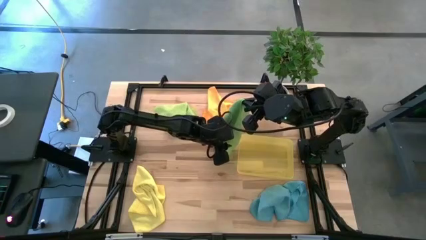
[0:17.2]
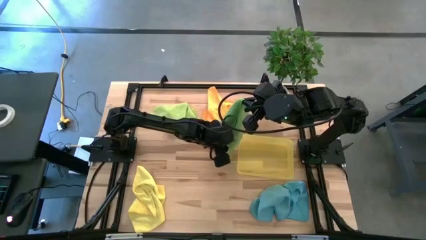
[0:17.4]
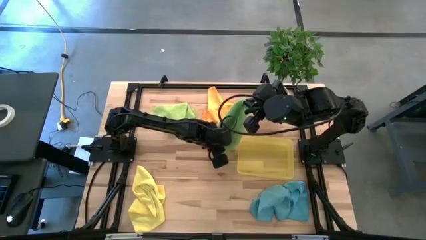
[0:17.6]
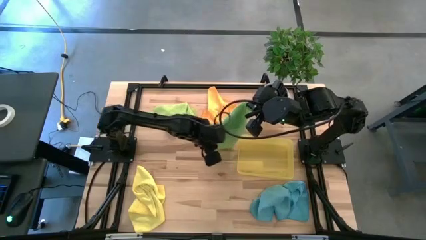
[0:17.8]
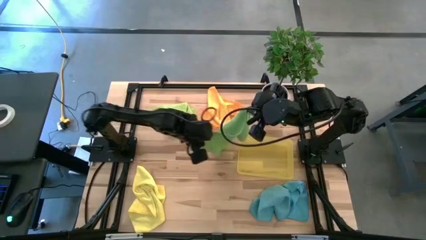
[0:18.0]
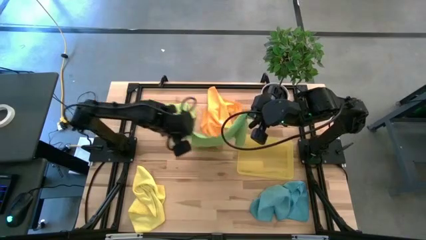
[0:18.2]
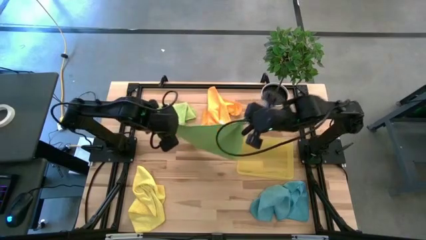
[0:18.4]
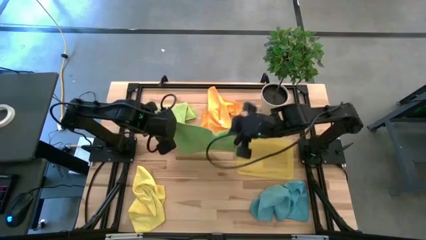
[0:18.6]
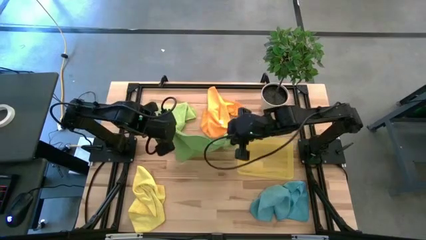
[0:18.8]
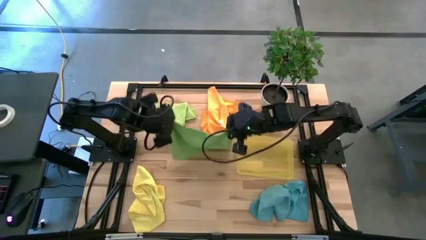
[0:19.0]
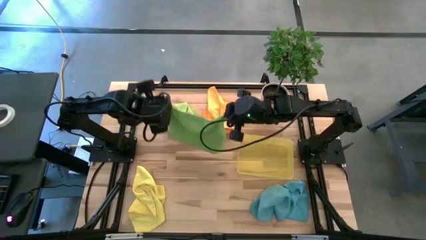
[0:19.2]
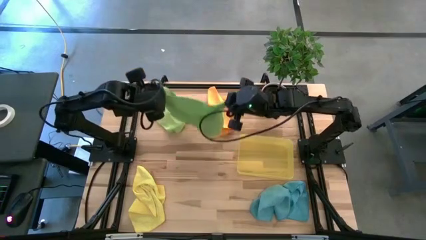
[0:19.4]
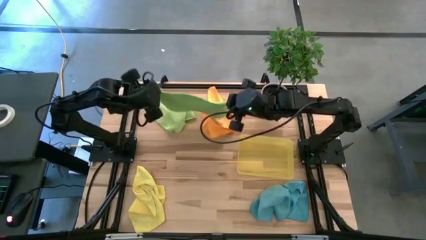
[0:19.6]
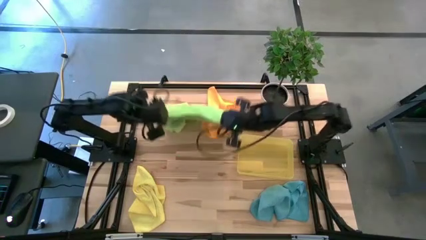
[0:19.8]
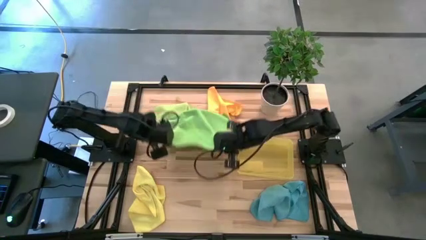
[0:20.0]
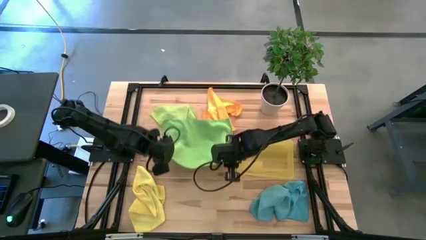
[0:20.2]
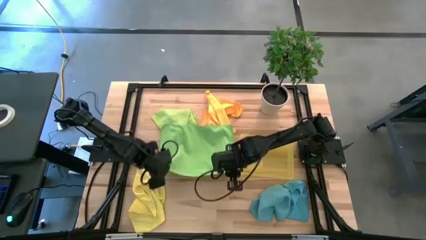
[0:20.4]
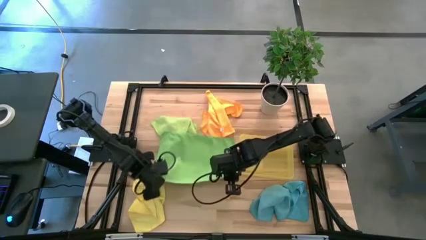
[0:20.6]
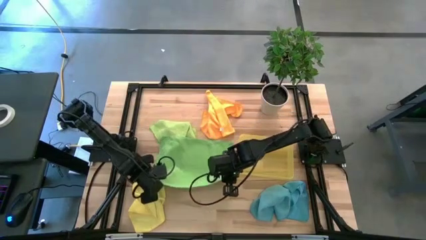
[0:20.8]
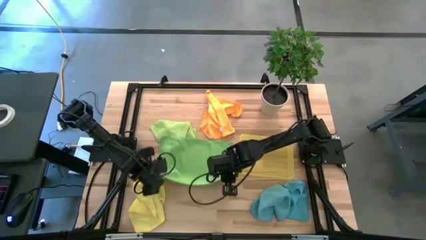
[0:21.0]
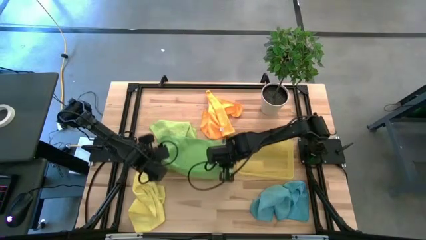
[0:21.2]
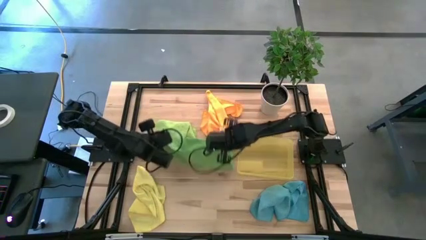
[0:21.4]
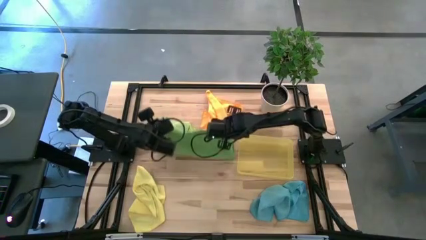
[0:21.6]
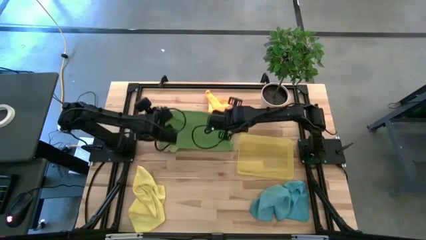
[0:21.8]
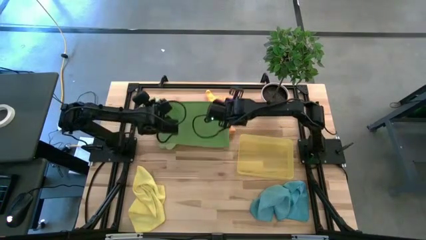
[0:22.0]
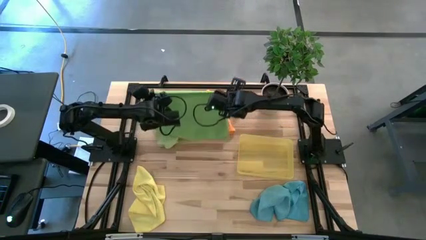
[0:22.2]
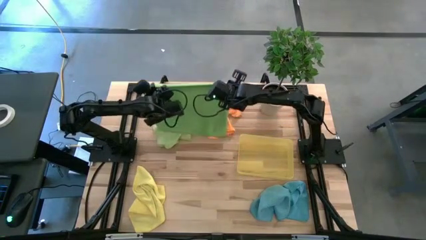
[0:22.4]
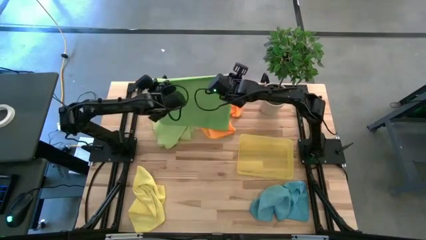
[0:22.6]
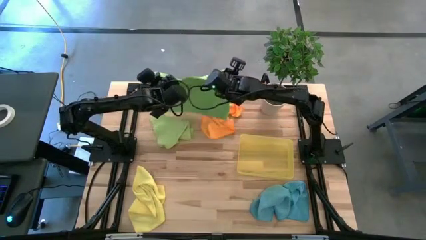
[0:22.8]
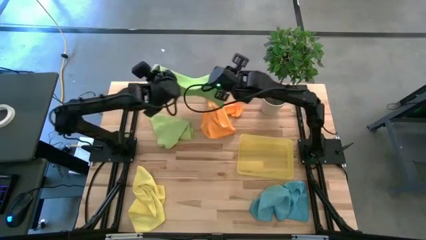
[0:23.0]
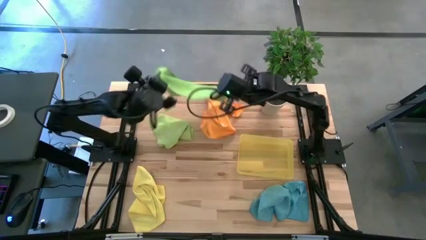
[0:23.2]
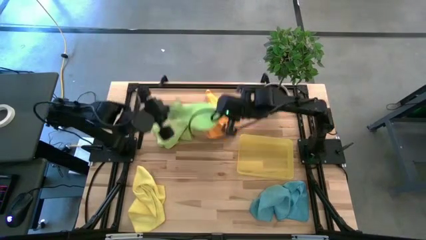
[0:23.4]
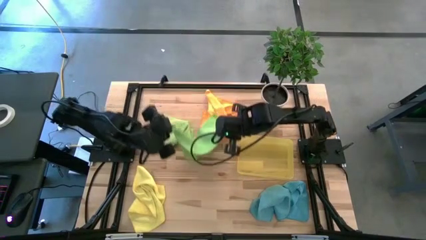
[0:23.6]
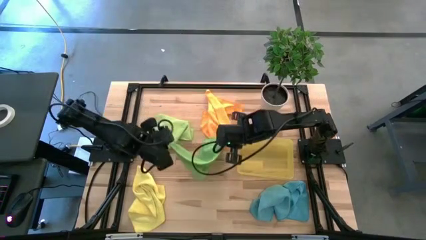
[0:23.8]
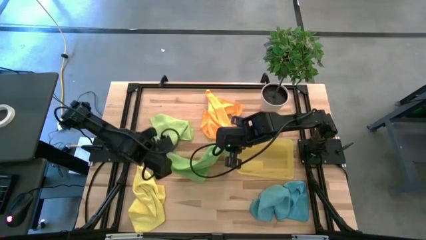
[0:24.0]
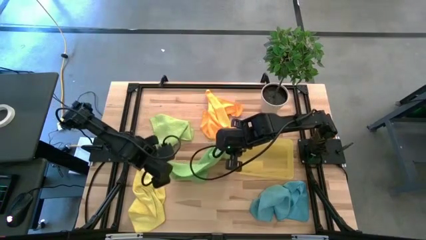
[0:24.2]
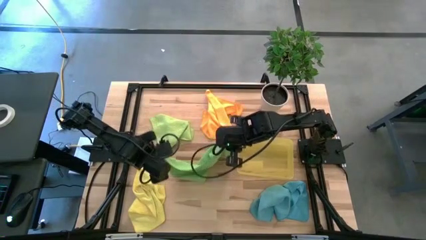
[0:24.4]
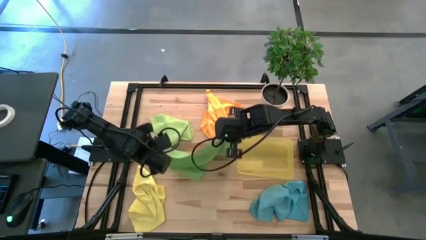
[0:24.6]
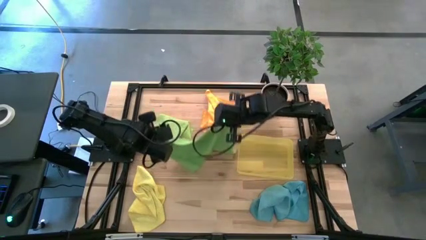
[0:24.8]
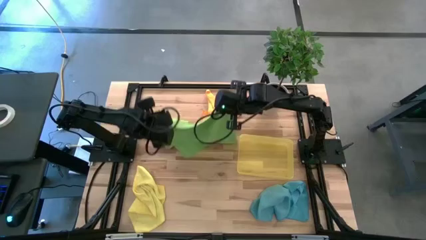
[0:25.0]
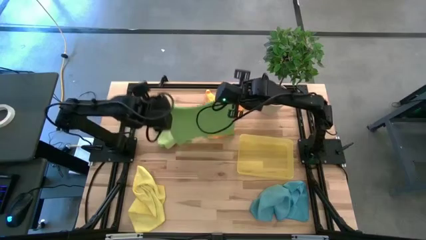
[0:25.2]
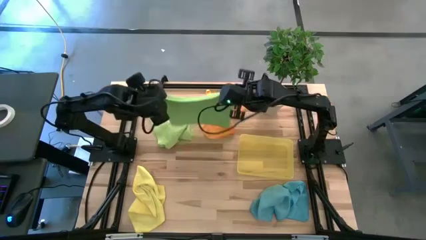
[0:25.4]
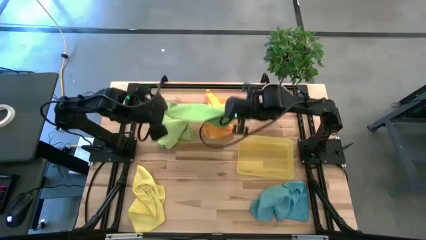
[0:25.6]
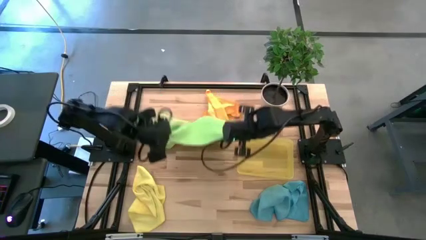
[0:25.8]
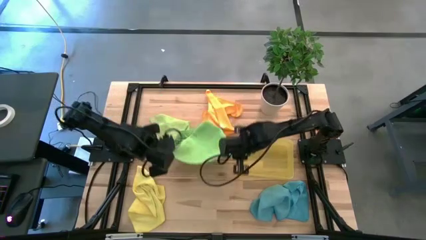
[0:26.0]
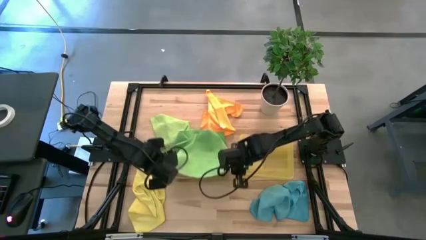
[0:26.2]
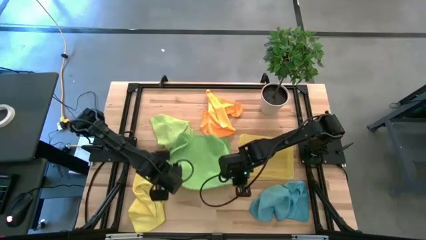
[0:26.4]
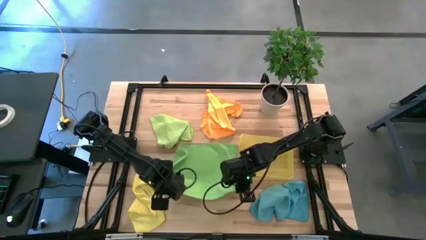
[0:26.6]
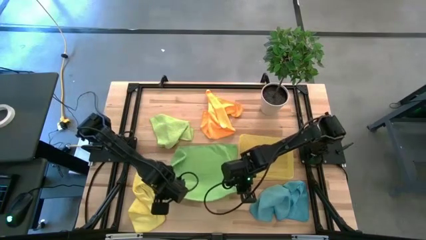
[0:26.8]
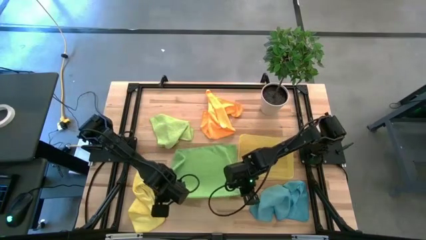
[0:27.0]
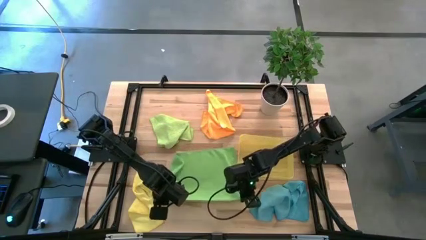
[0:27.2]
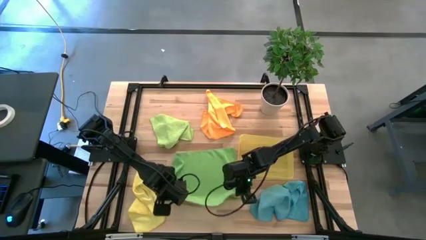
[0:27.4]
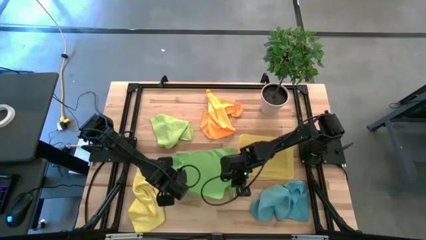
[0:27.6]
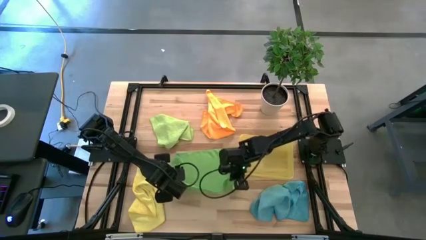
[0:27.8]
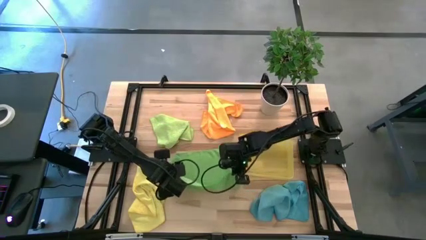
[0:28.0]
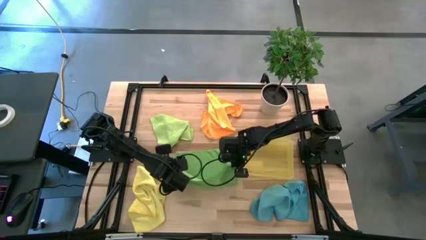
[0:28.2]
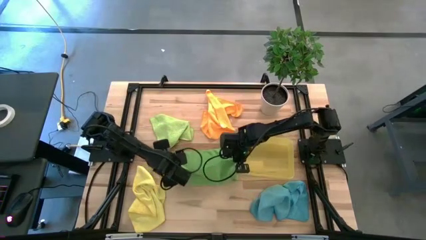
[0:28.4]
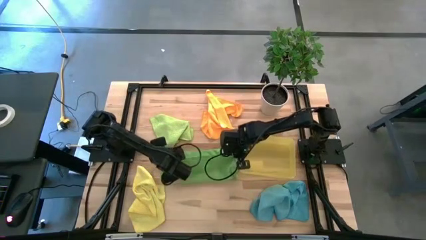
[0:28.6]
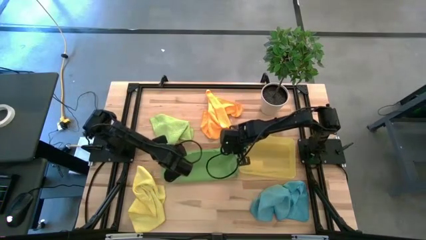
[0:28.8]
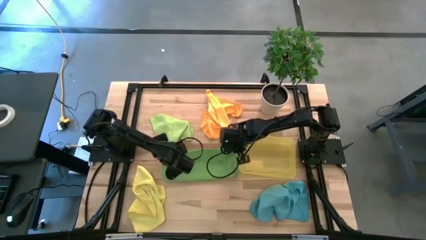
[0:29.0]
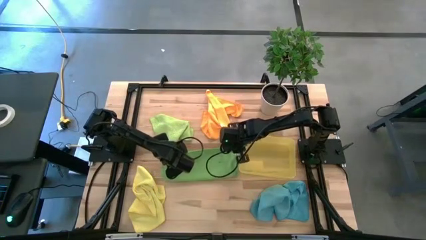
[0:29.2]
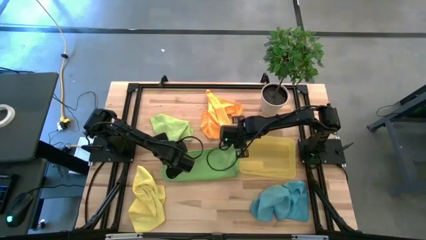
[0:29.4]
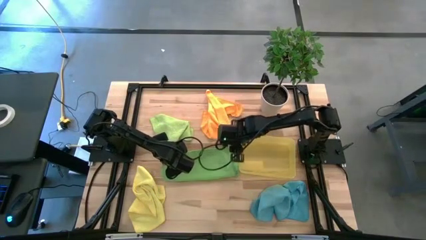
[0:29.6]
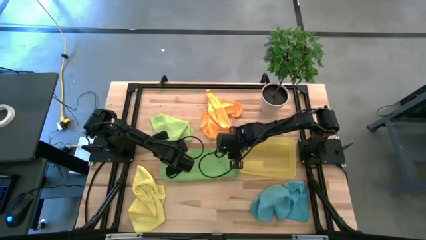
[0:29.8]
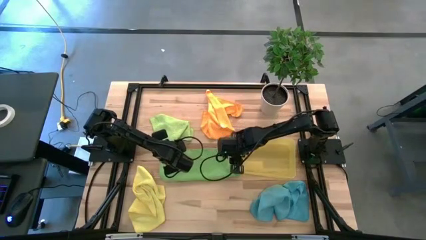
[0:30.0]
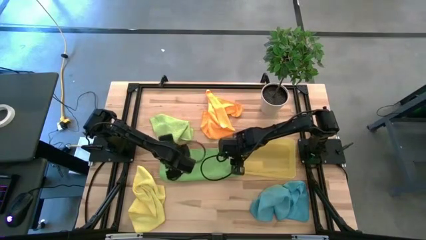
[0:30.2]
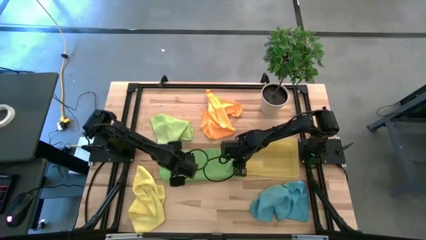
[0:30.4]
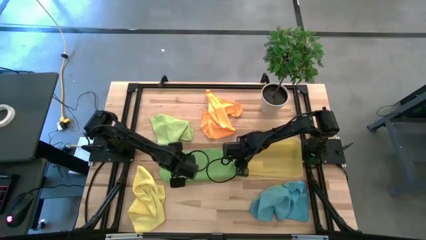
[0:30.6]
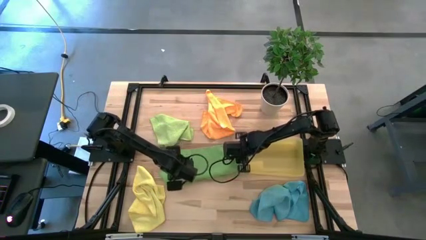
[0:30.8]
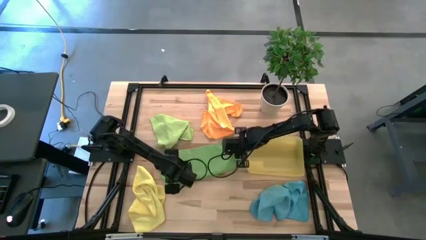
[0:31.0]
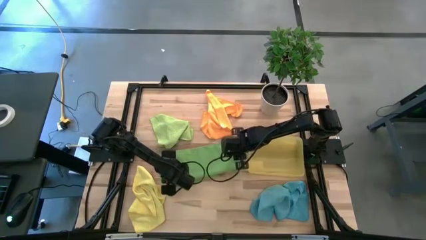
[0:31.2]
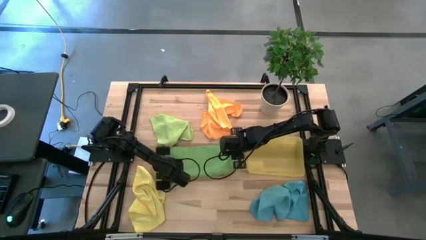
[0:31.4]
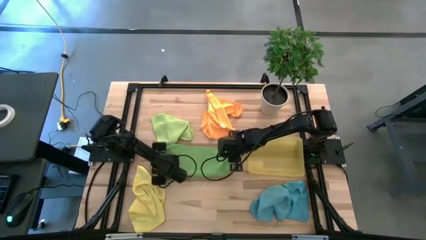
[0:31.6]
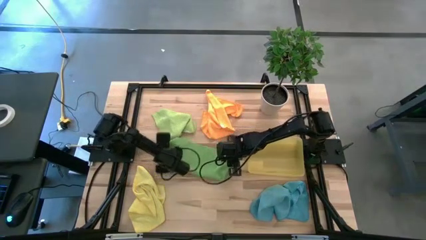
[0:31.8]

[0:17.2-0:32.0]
Task: Fold microfiber towels
Fold the bottom green microfiber cloth
